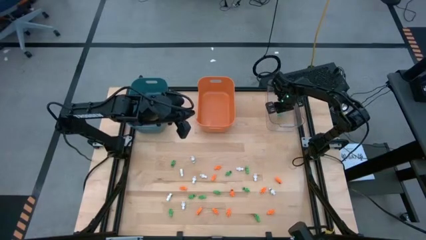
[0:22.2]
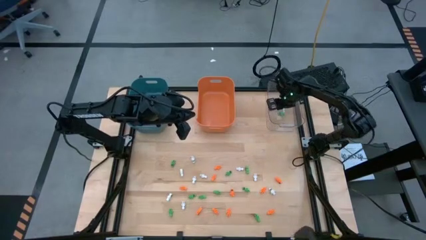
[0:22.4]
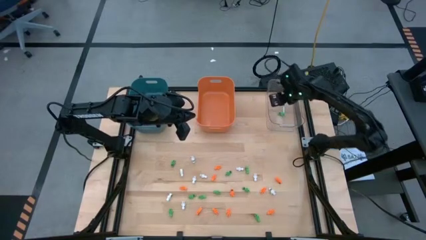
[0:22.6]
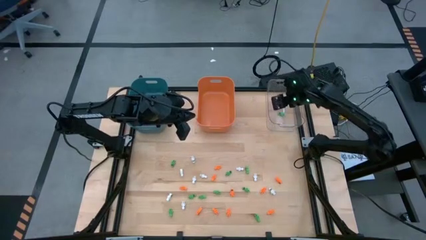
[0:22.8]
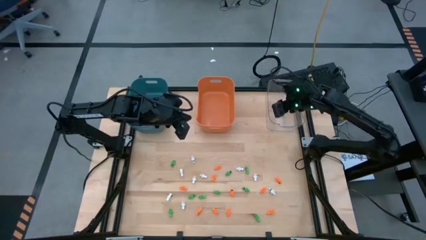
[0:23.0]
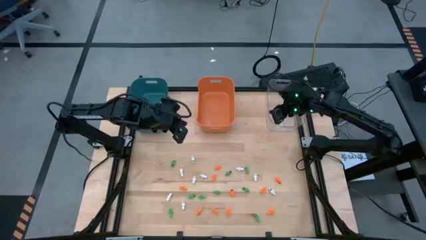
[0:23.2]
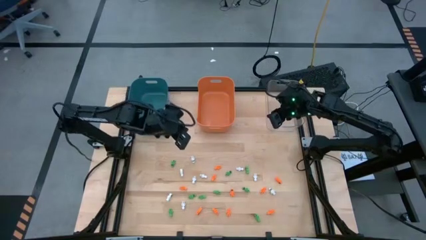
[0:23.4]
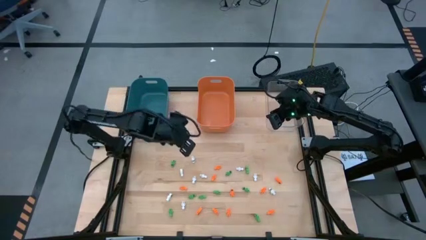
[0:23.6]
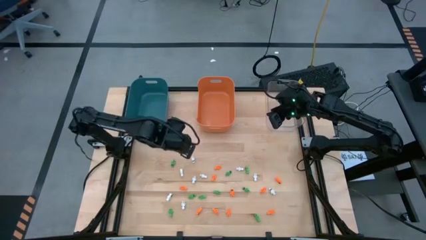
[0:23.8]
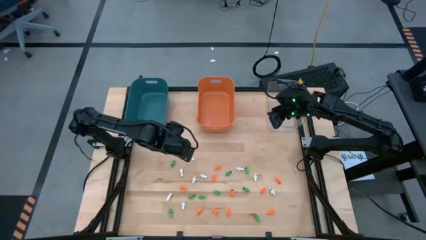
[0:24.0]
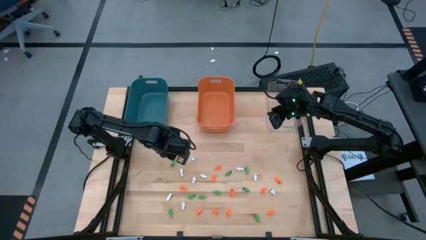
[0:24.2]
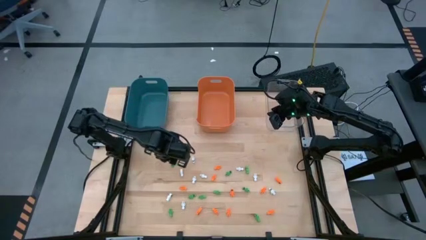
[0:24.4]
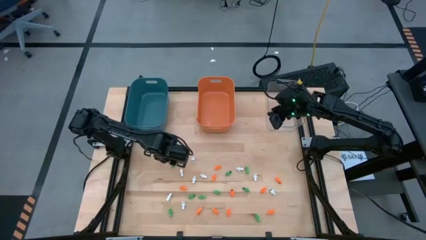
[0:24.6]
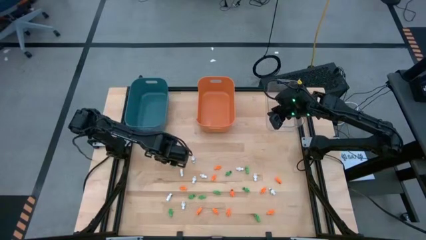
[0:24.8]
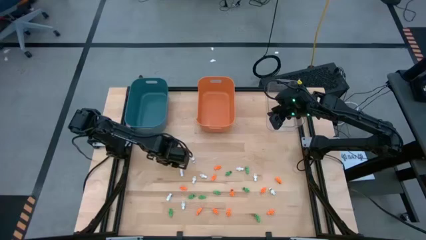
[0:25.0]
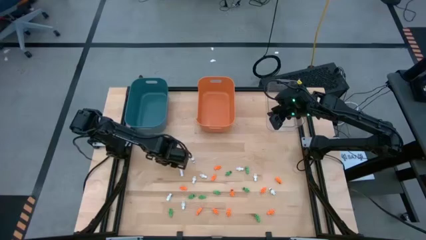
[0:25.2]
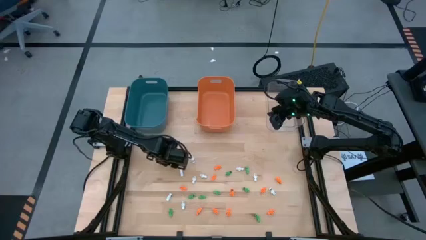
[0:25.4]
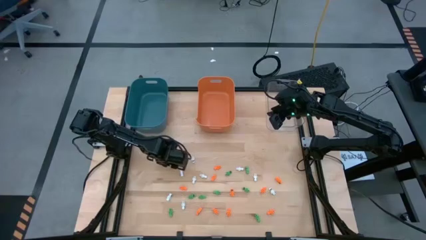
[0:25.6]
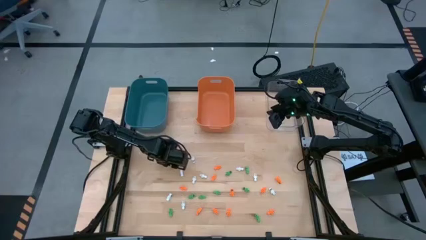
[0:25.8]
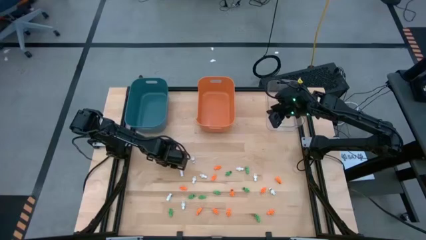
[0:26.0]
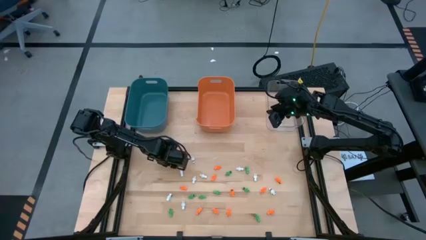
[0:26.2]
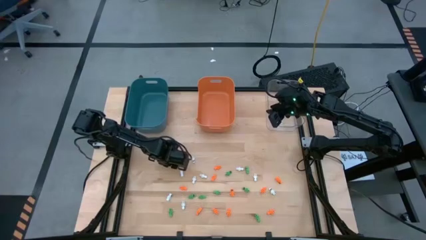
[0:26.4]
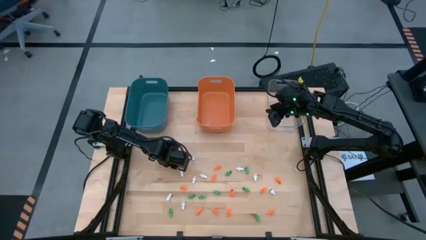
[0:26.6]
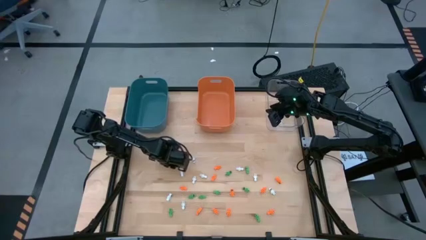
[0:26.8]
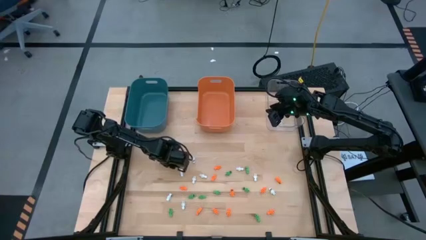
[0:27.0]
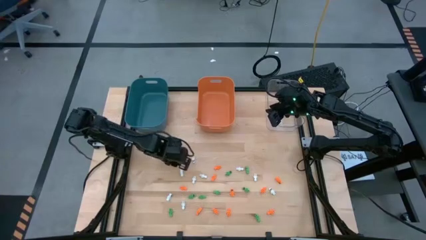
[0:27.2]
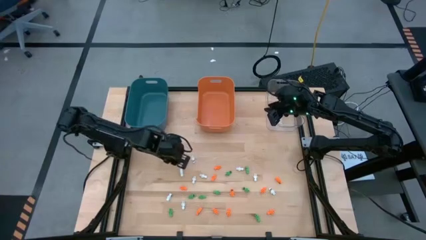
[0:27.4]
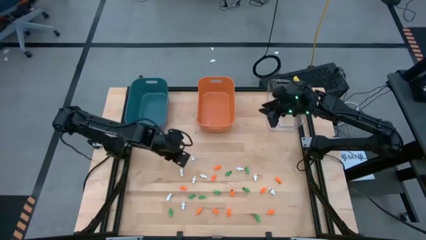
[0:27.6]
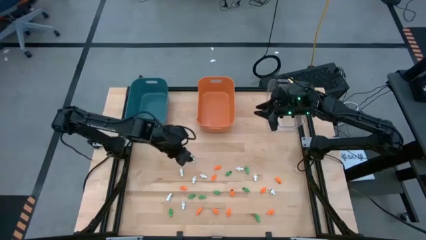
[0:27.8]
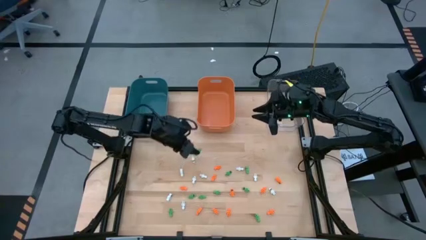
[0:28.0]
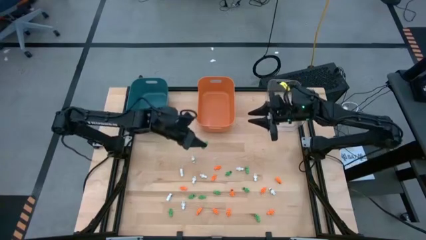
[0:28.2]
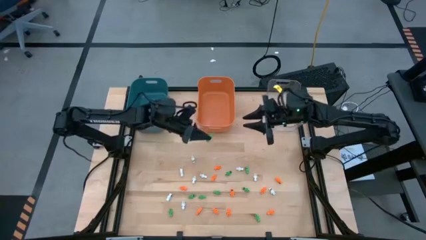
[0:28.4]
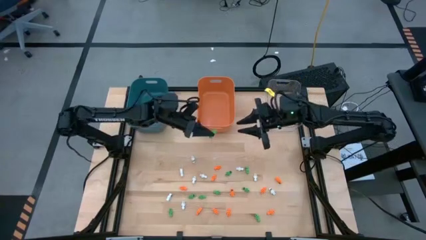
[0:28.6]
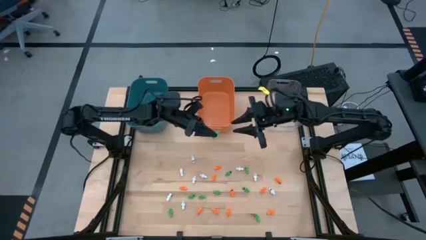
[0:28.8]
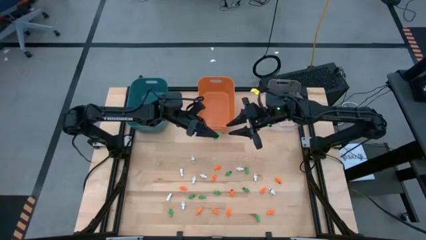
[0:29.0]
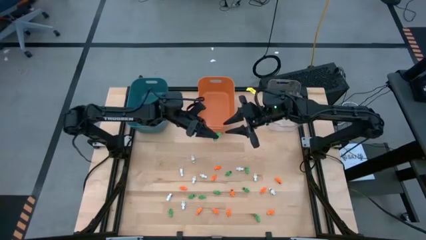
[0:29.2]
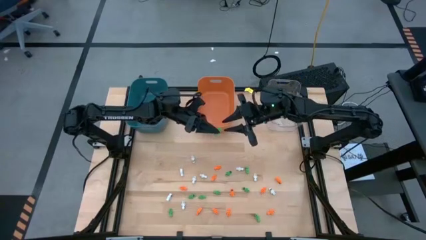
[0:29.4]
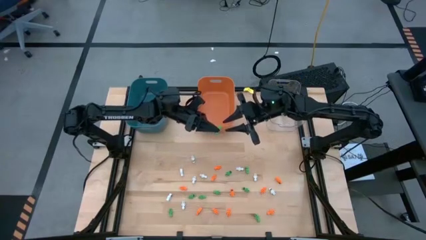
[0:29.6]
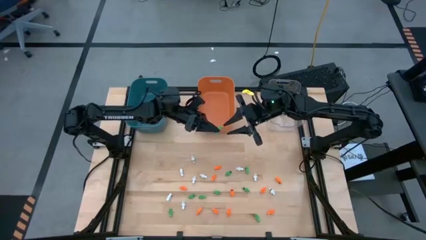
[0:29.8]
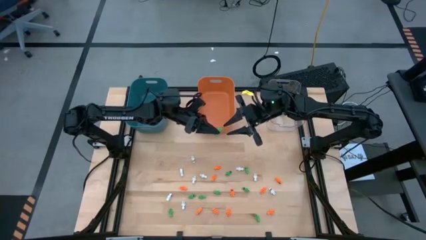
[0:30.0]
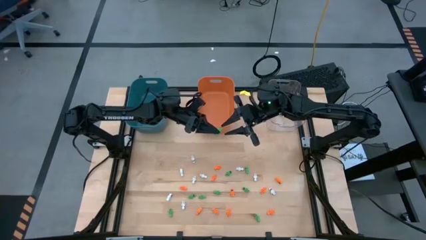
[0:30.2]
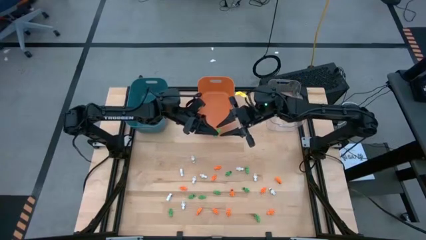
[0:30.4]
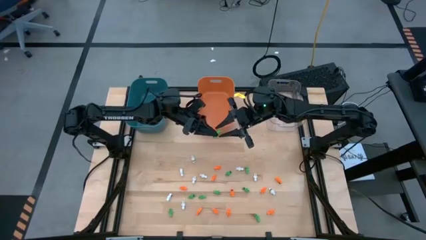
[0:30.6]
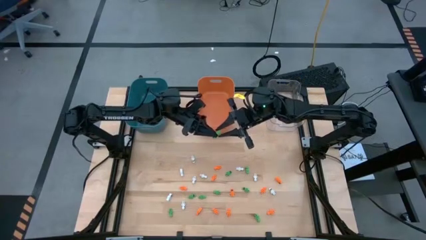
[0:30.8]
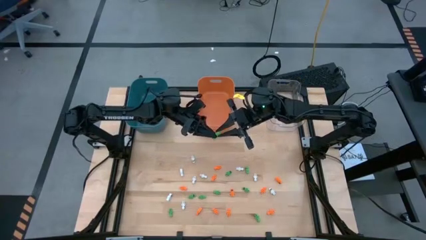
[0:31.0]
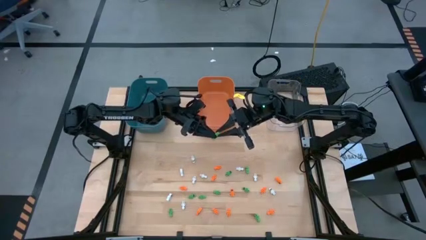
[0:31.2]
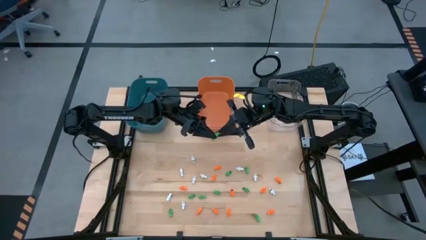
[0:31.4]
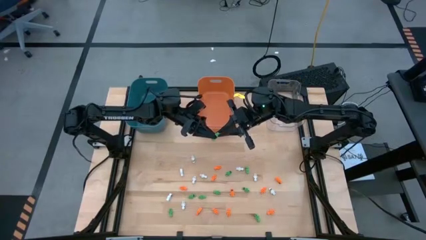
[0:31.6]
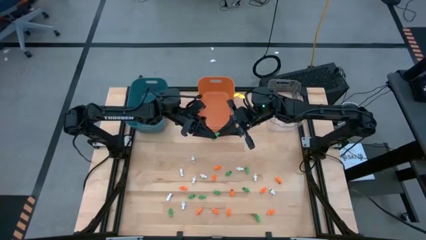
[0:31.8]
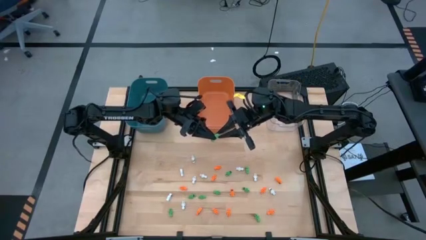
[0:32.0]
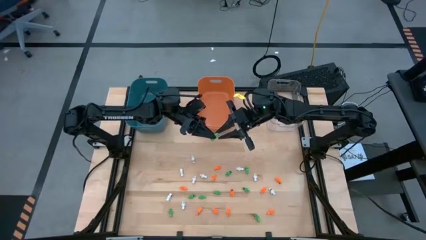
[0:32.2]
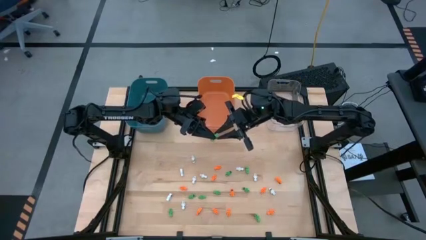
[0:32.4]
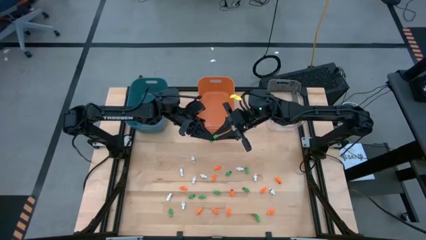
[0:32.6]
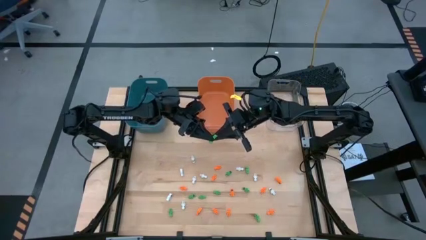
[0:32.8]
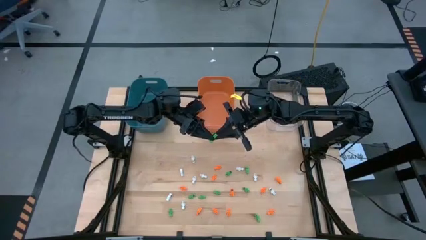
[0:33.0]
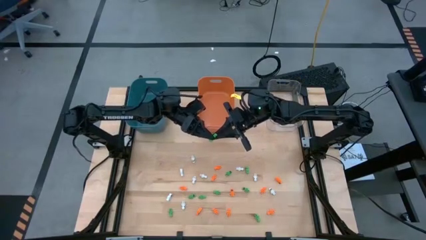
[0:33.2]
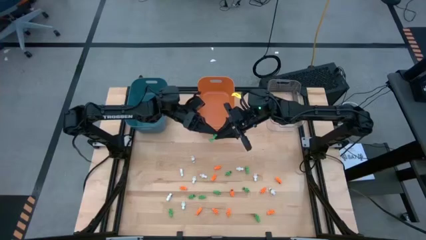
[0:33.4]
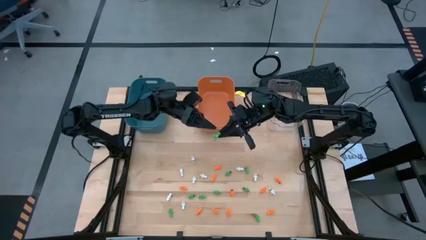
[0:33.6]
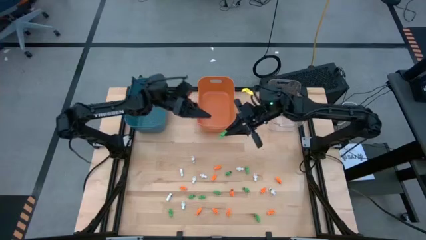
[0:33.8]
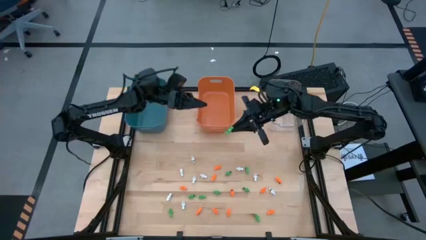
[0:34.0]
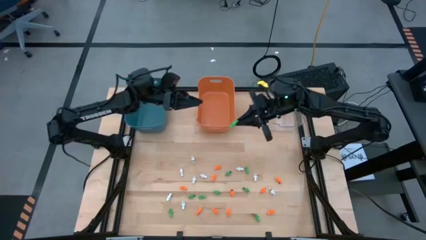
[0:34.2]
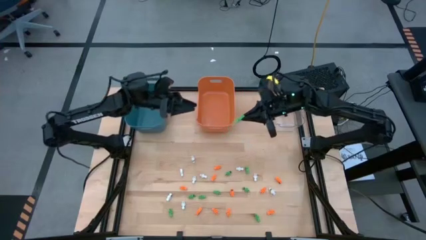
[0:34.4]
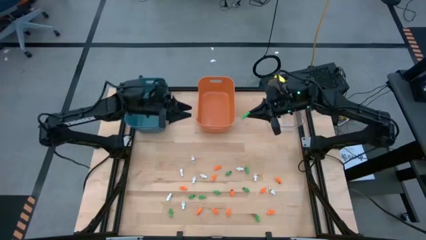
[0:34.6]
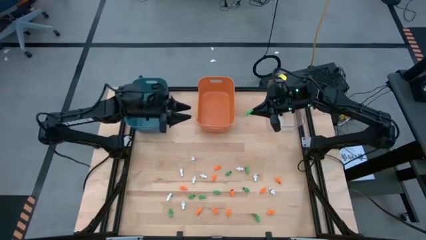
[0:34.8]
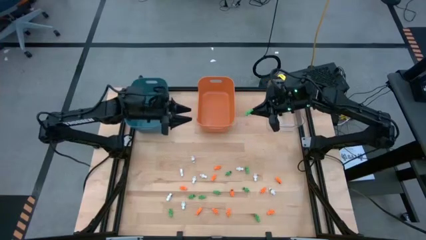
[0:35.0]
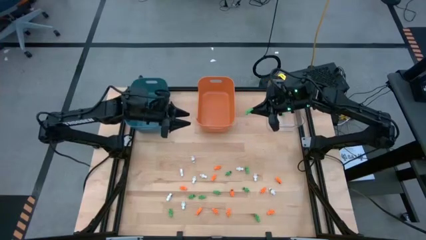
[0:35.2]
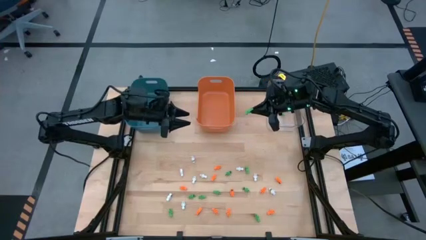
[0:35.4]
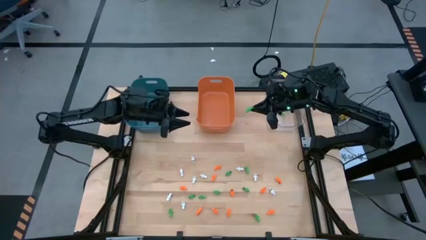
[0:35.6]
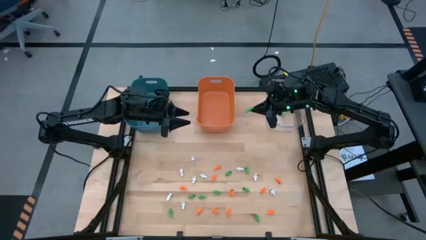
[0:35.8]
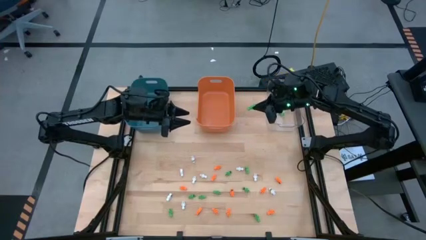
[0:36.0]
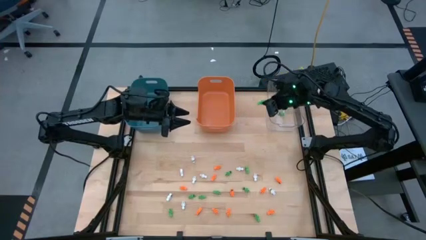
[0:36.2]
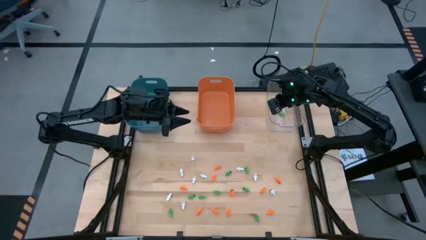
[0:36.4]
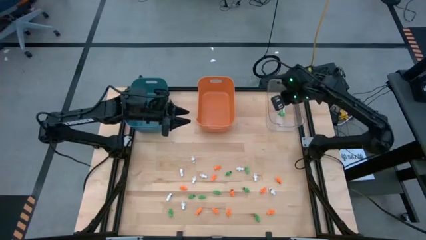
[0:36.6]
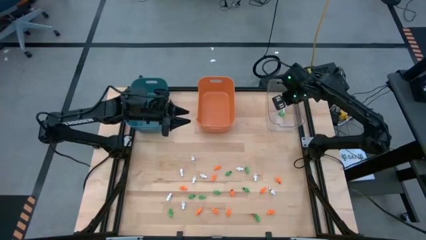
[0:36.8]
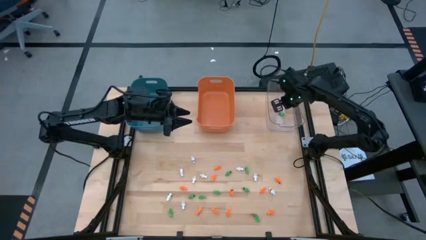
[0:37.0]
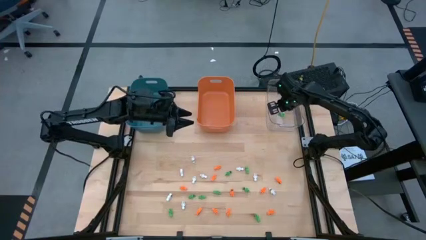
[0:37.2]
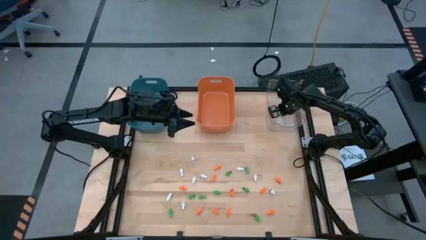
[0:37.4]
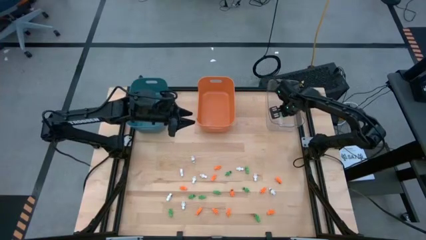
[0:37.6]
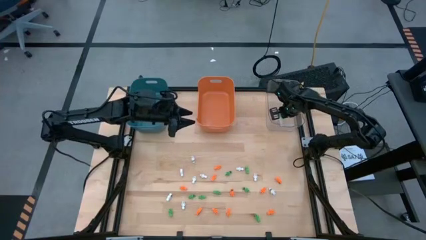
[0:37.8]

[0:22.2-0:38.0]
Task: Sort Halloween decoration
Put the green skeleton toy into the transparent bin
